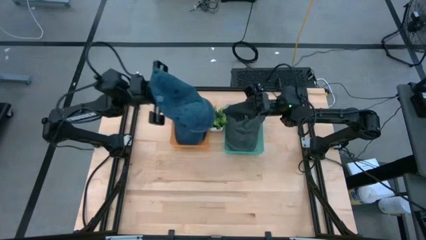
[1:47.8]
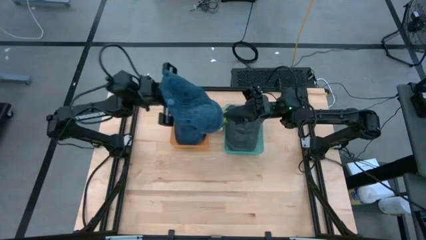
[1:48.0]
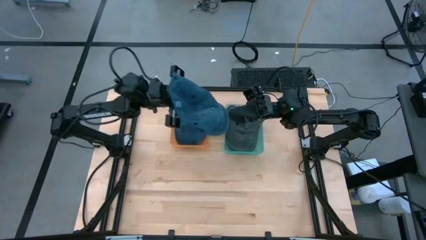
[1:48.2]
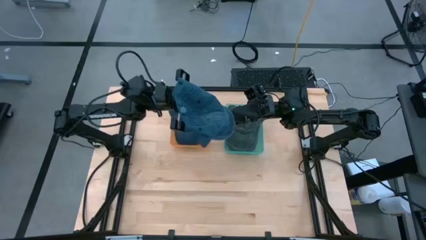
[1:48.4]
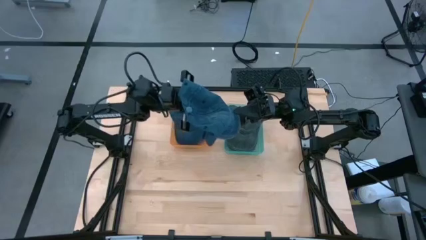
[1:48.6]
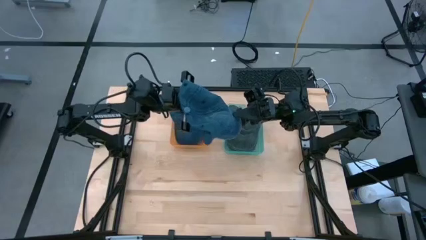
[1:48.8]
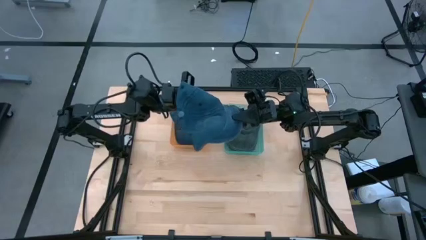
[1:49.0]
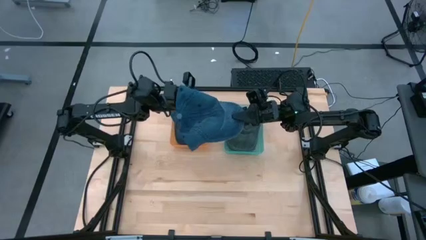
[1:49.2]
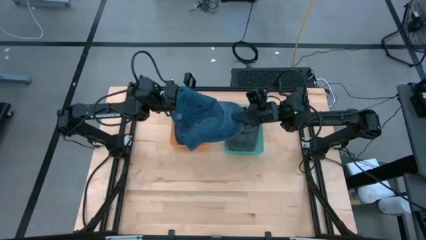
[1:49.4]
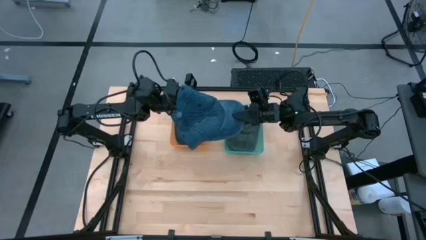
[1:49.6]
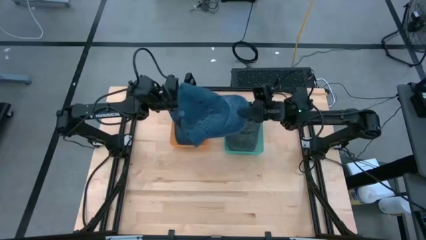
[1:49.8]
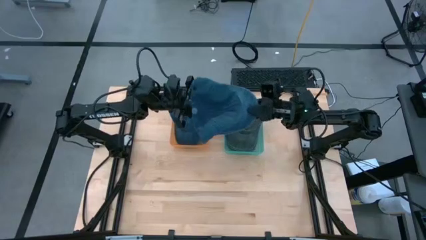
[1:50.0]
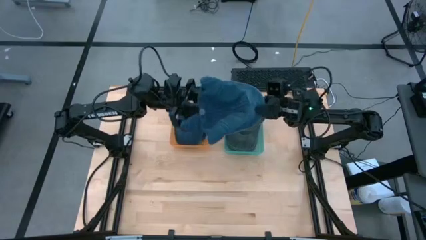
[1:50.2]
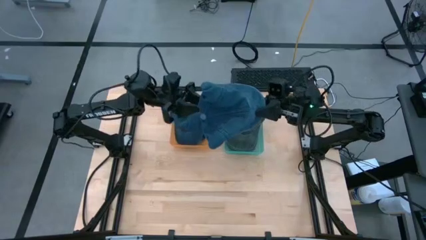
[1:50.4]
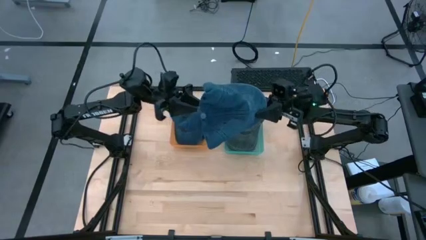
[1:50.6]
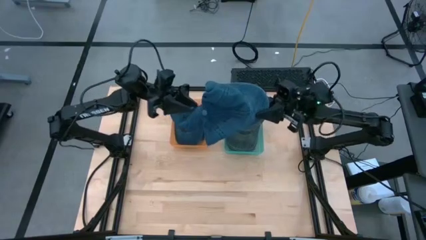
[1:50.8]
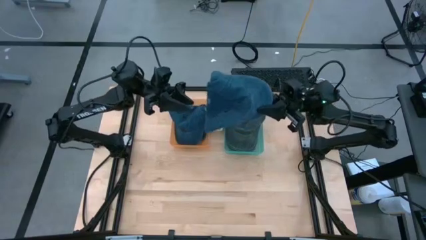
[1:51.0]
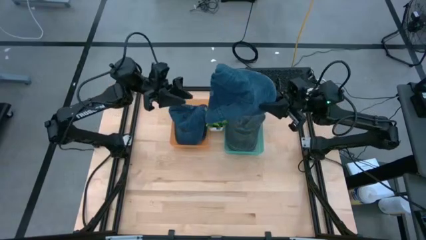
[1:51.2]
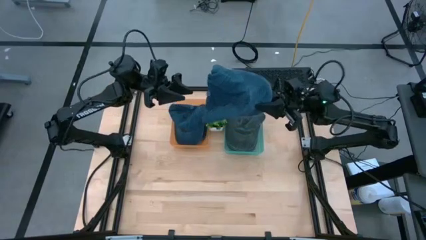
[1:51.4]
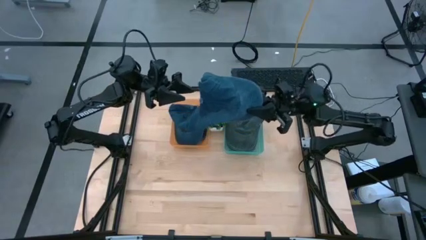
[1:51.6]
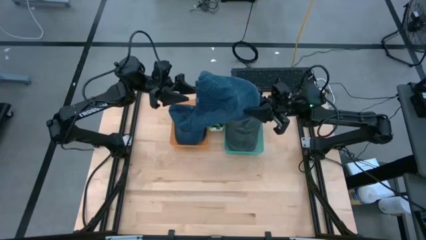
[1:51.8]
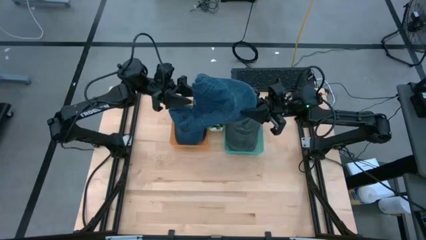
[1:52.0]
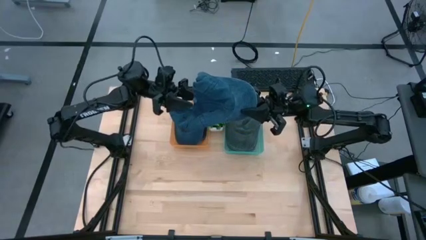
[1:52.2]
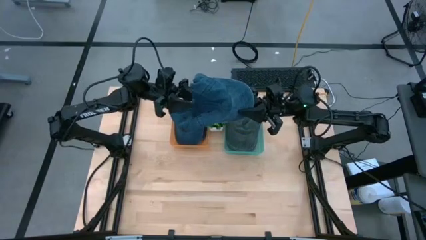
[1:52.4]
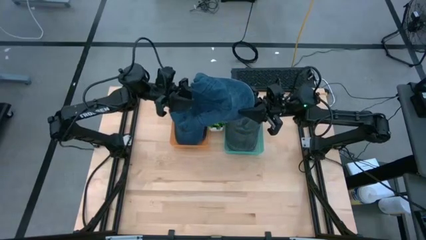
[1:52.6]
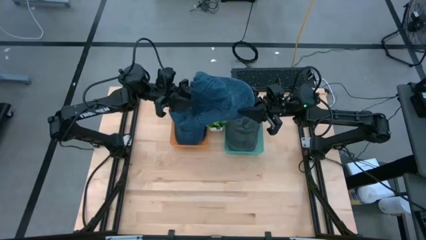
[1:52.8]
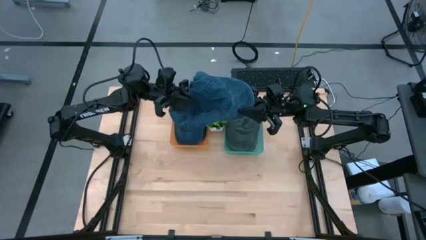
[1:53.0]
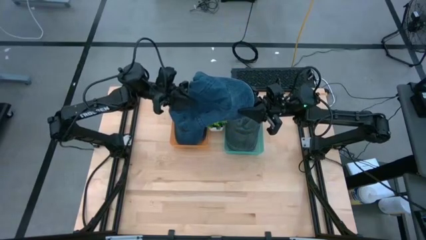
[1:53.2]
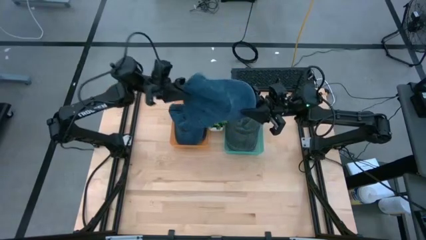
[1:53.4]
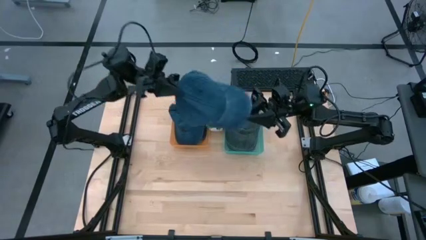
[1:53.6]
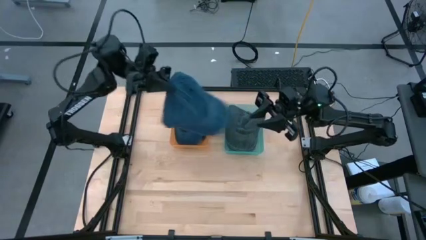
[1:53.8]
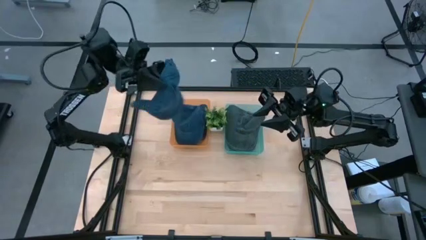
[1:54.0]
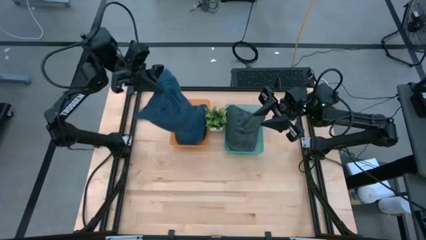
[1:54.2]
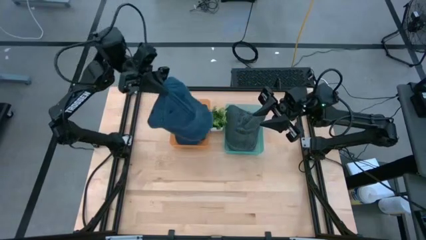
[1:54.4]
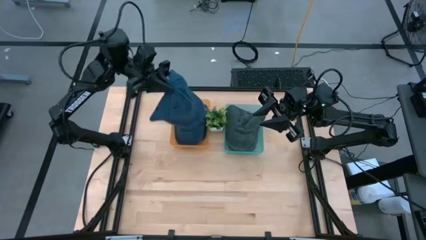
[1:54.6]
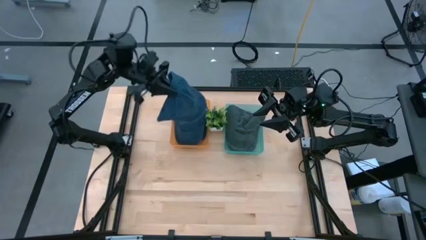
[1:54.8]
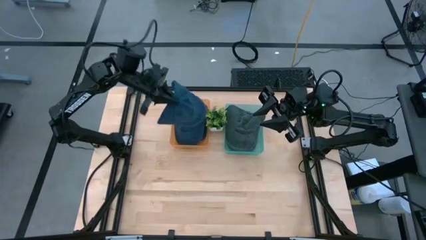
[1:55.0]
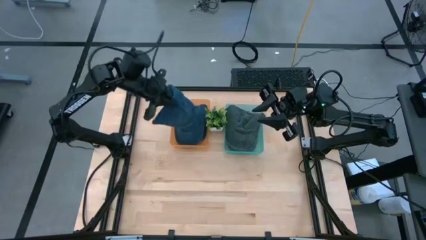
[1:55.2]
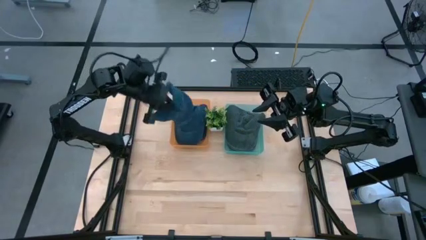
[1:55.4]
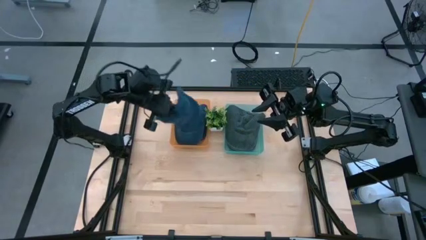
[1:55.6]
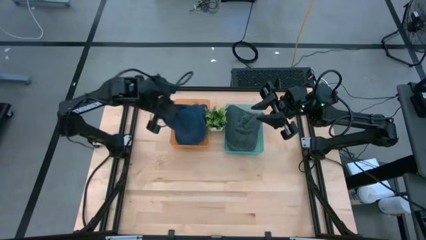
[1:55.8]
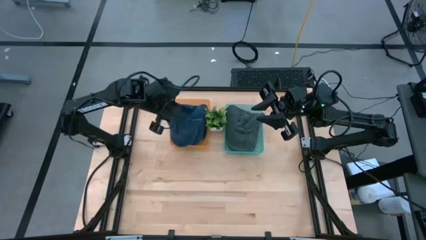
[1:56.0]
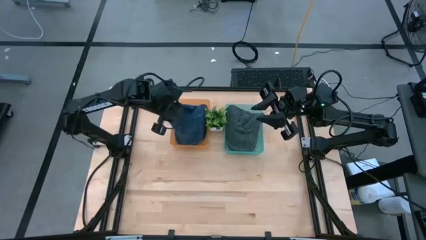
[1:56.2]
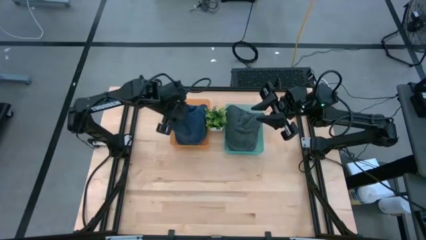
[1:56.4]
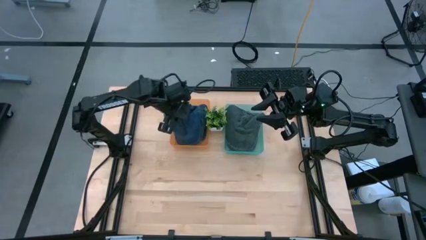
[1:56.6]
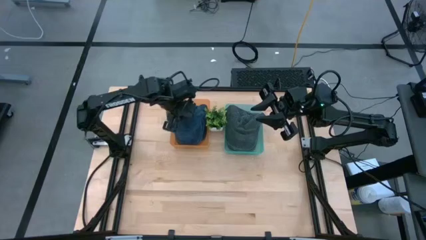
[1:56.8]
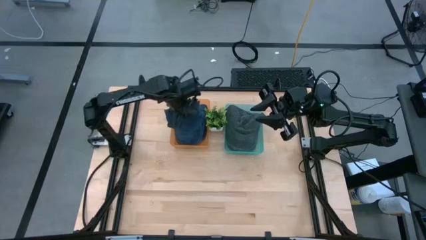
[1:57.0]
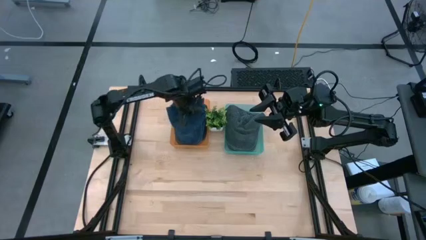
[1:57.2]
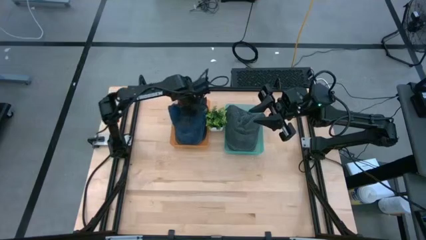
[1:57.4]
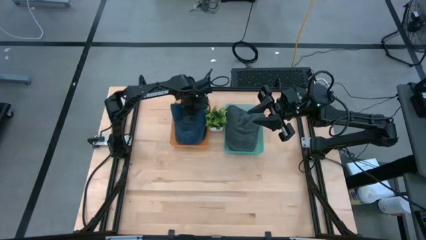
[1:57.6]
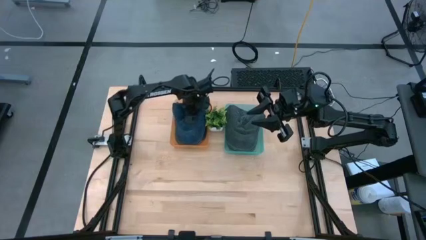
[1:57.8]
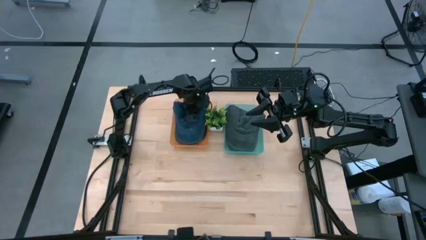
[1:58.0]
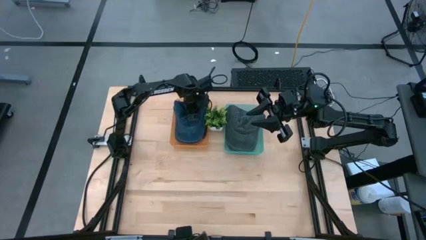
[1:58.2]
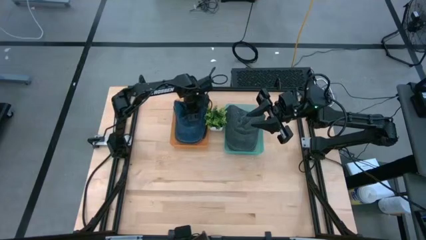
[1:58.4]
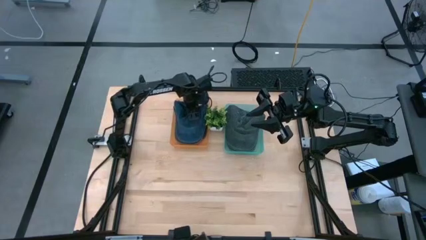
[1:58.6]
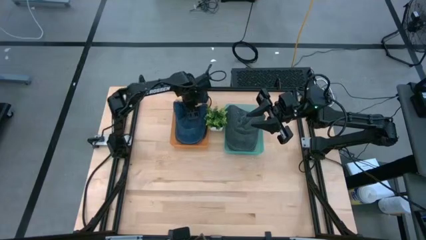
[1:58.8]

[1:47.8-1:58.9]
Task: Pick & Place hat
Put the blue cap into the orange bin

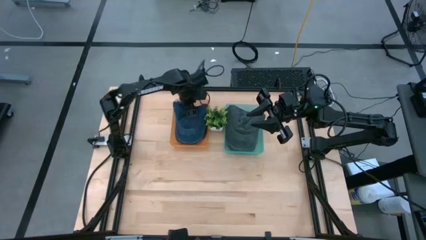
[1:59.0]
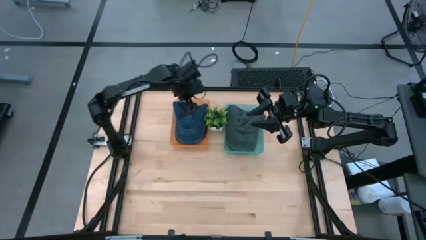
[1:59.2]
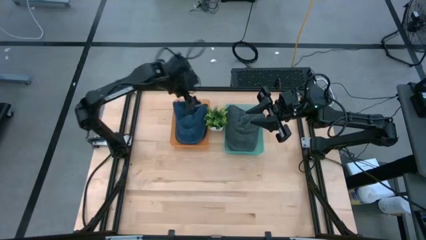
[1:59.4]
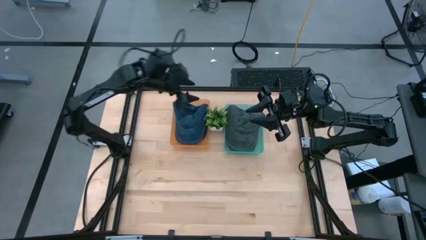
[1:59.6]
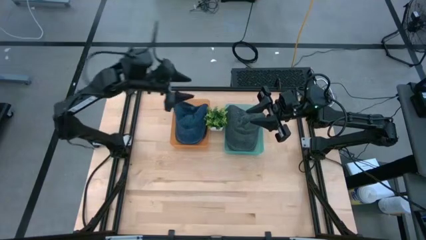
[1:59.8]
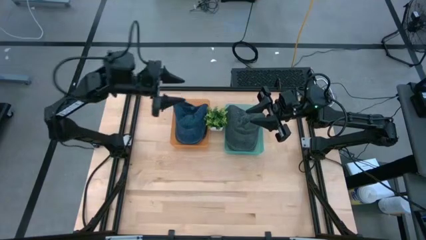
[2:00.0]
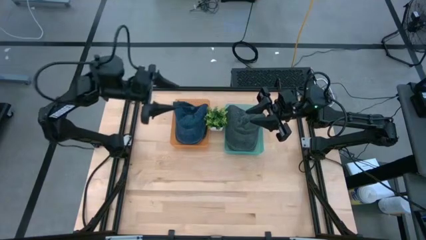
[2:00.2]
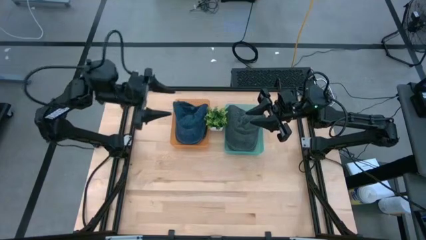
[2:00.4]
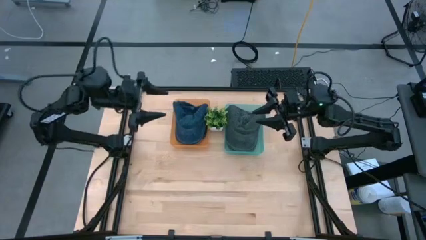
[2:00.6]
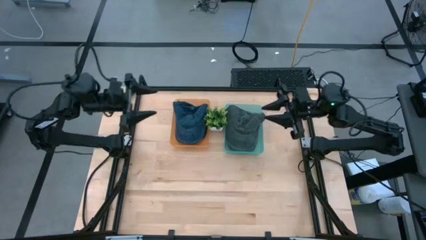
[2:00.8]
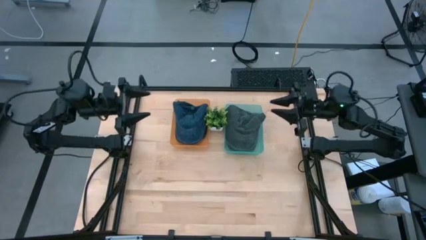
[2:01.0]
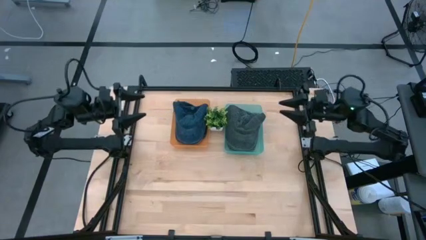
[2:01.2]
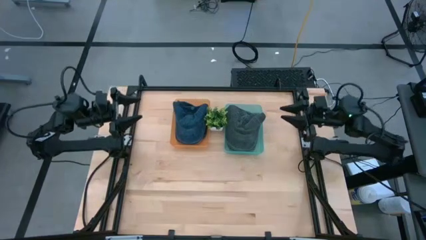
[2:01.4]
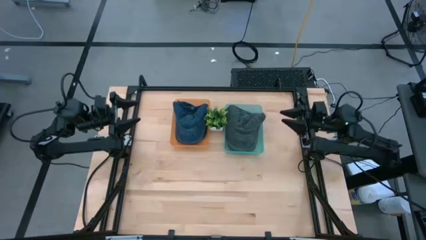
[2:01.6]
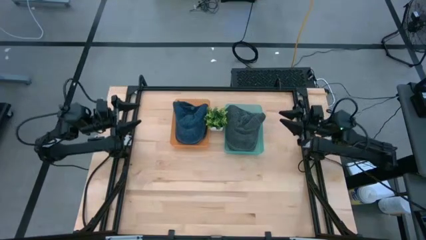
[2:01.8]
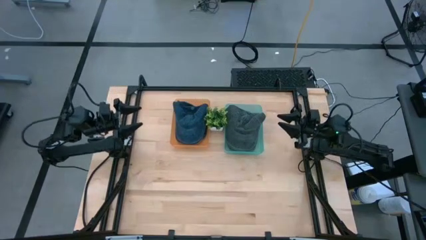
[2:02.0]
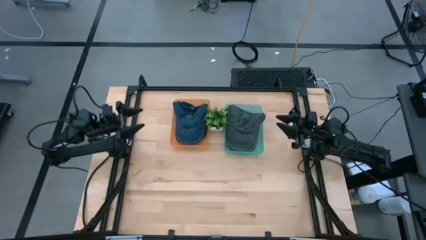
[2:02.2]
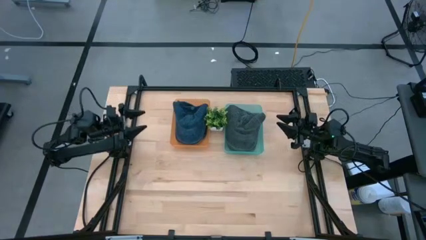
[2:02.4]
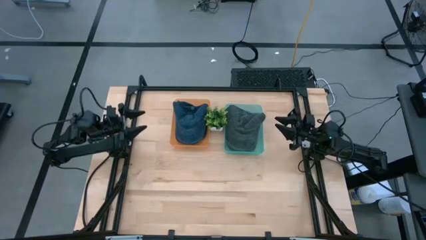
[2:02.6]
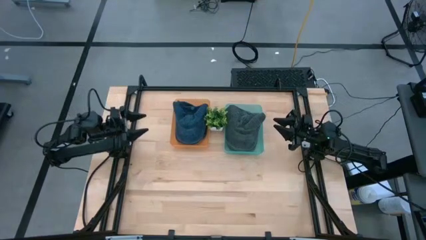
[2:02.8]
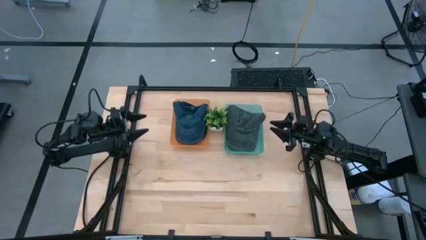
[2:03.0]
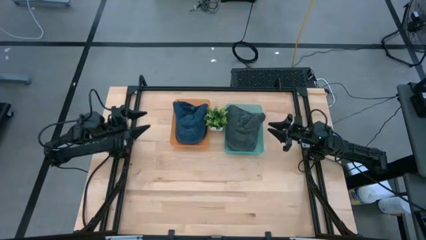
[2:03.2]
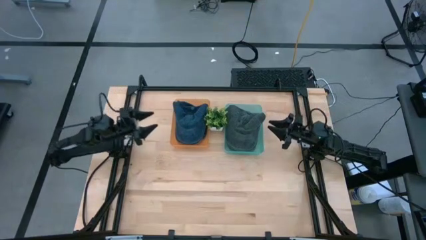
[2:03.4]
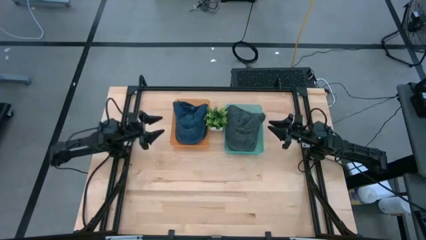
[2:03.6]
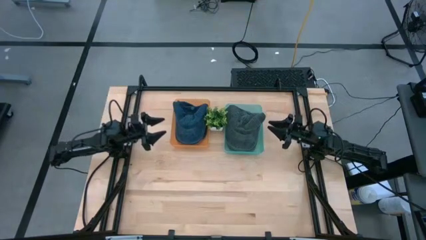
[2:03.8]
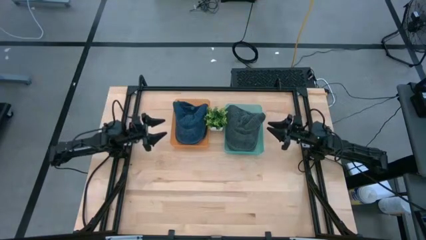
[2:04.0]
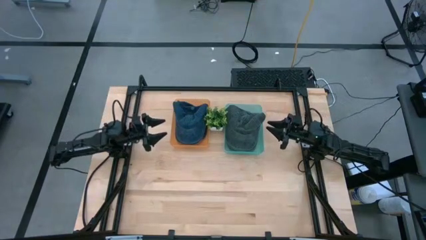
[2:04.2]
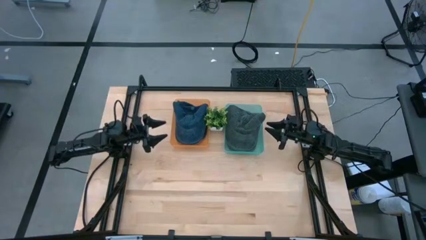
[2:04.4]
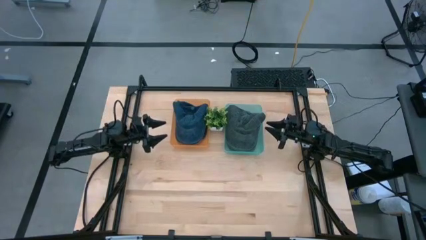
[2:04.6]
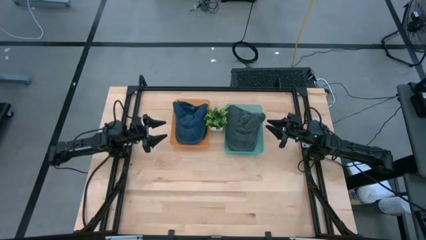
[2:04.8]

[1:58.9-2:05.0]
Return to Home Position
